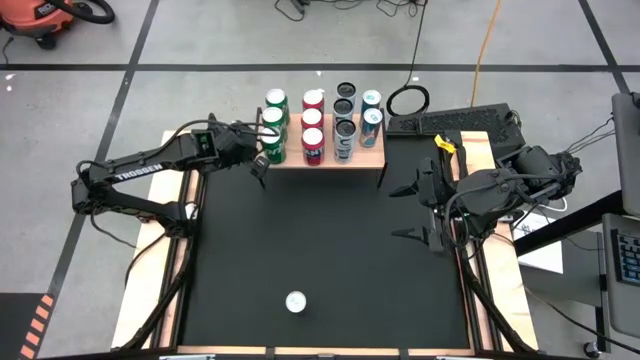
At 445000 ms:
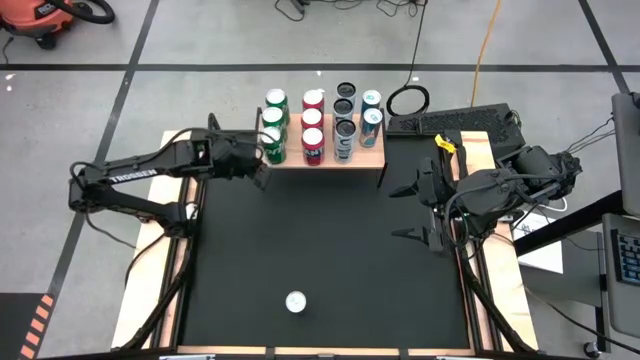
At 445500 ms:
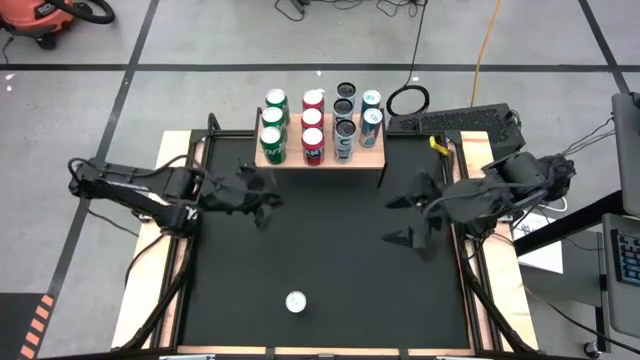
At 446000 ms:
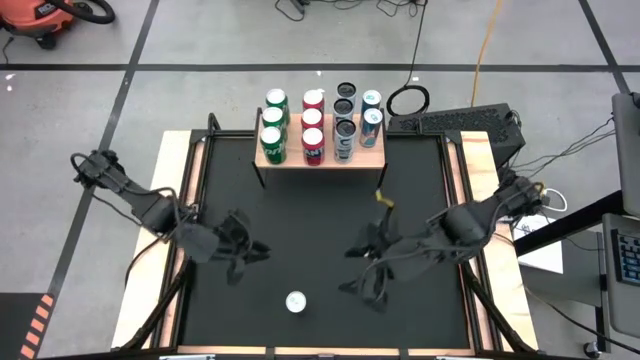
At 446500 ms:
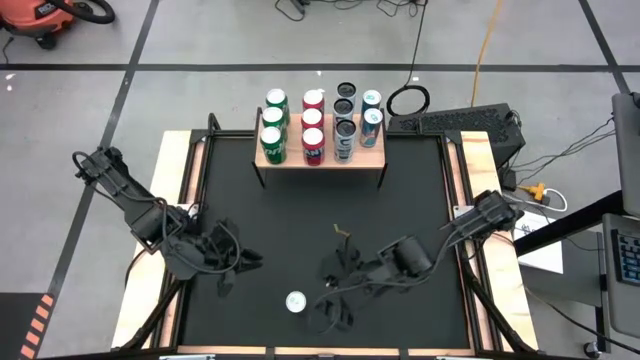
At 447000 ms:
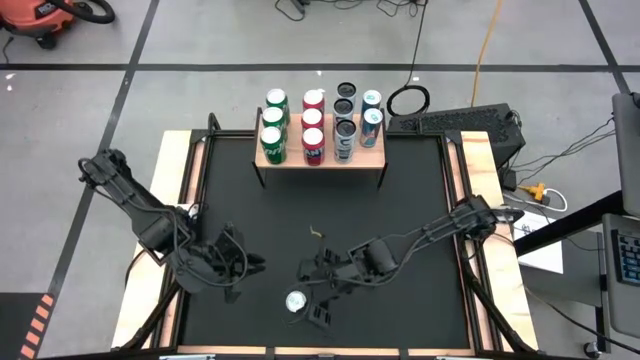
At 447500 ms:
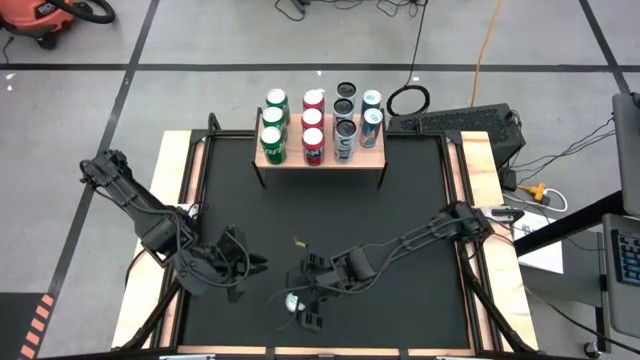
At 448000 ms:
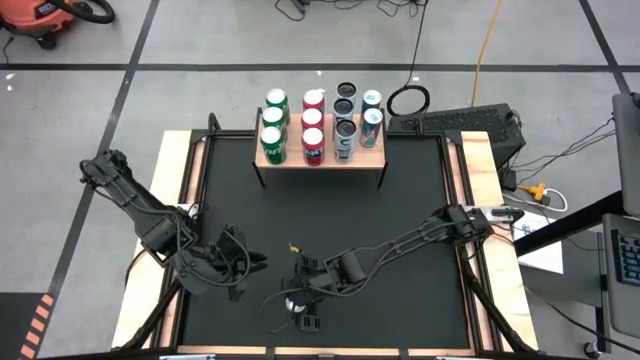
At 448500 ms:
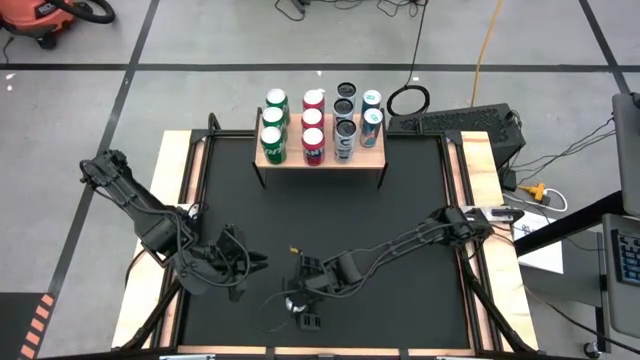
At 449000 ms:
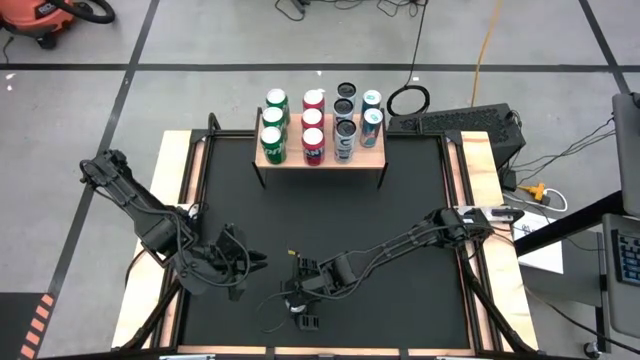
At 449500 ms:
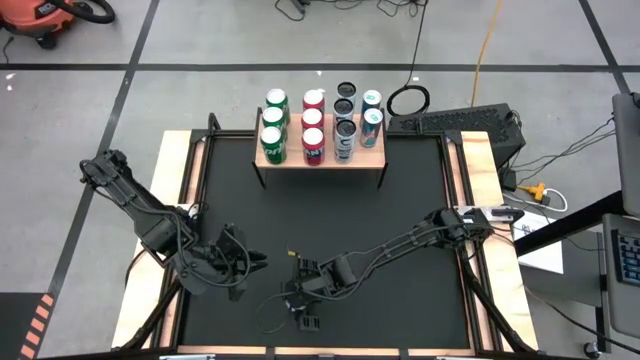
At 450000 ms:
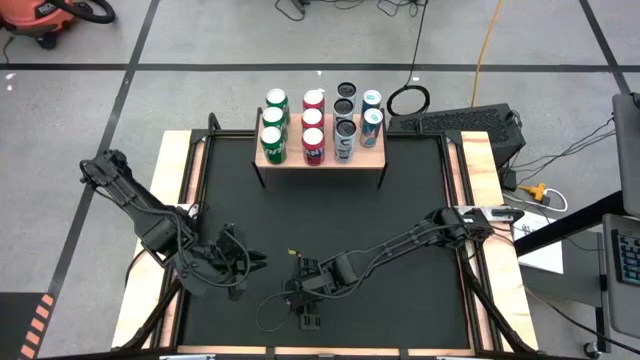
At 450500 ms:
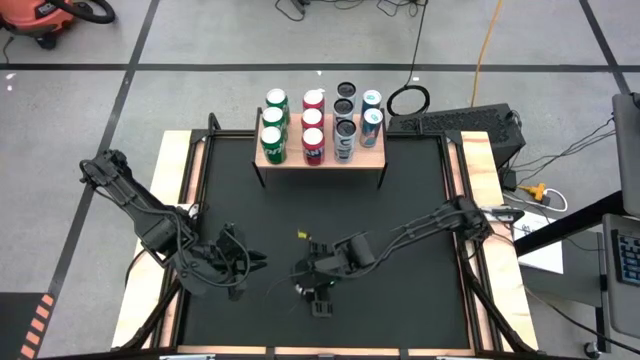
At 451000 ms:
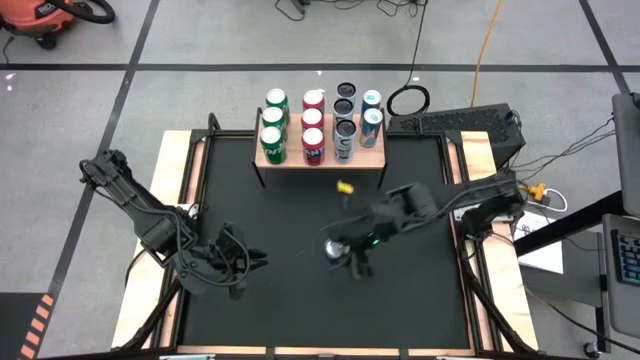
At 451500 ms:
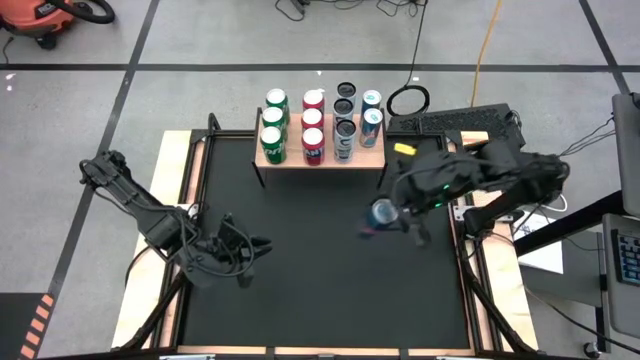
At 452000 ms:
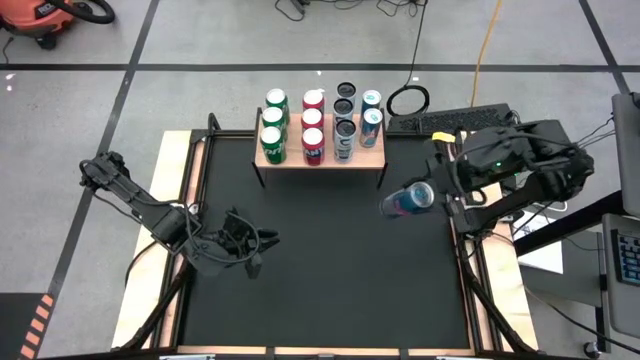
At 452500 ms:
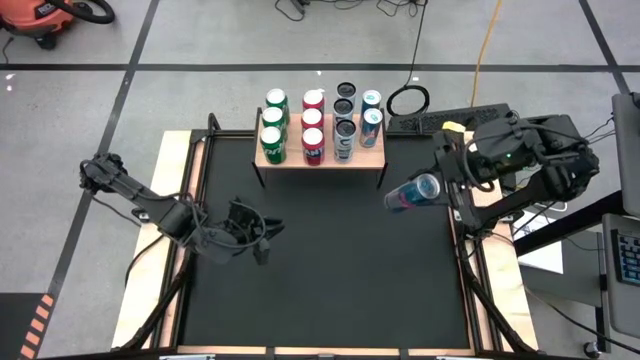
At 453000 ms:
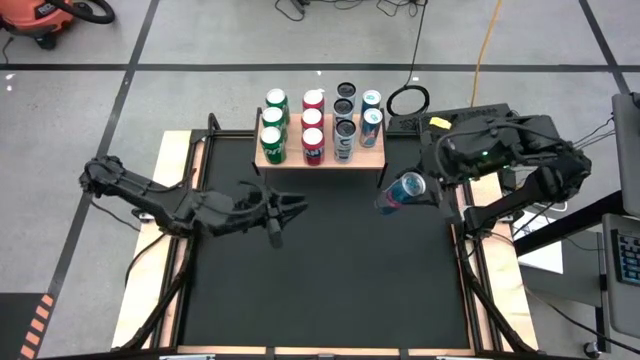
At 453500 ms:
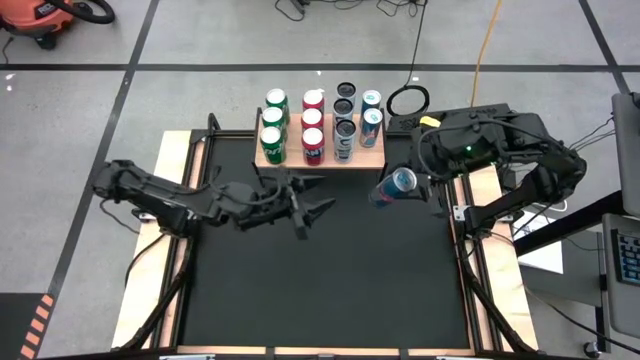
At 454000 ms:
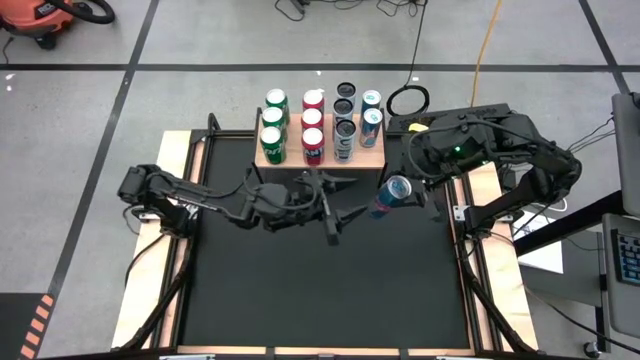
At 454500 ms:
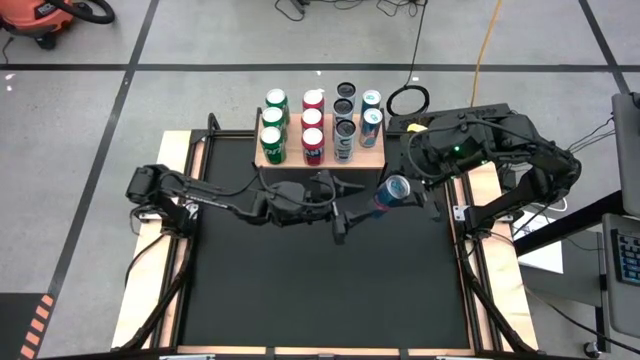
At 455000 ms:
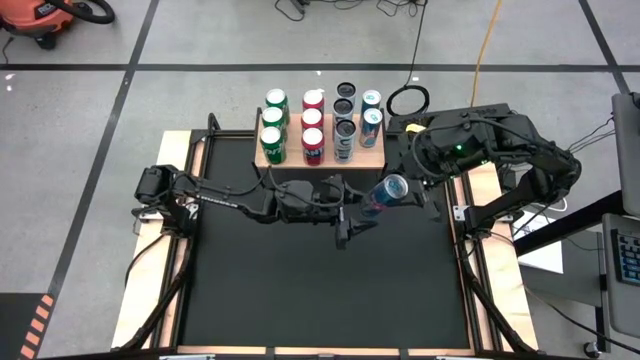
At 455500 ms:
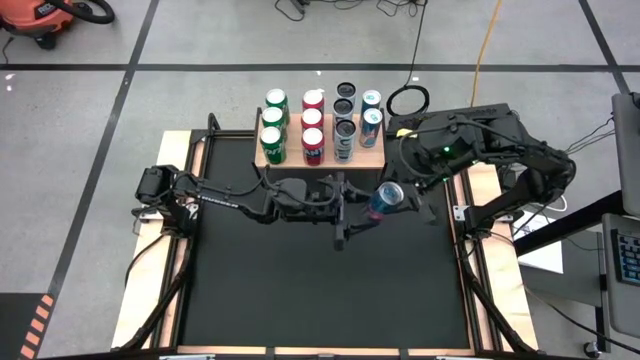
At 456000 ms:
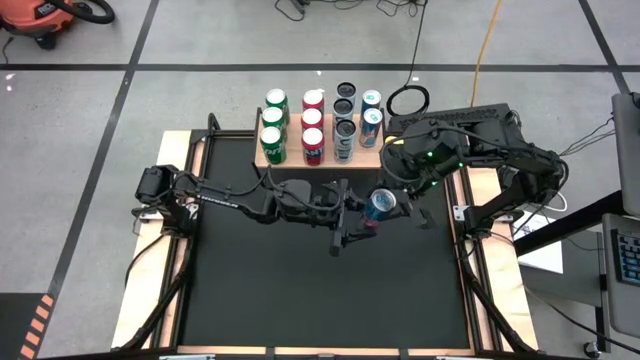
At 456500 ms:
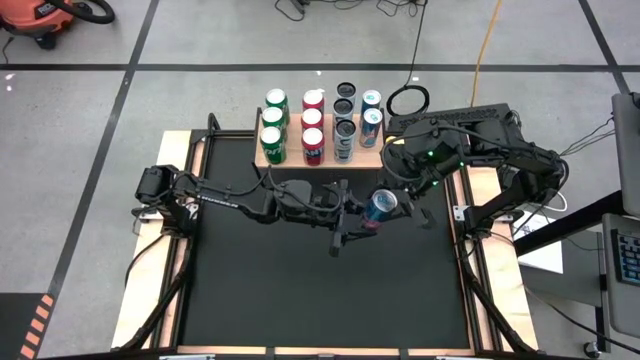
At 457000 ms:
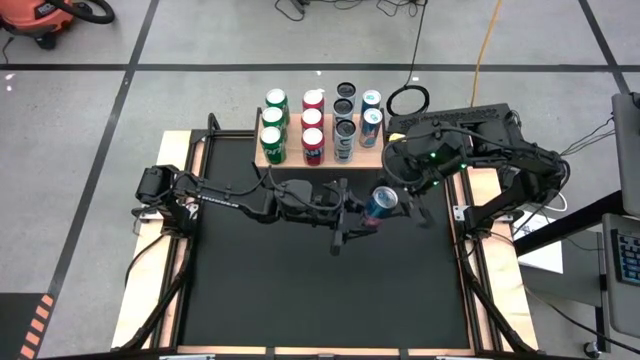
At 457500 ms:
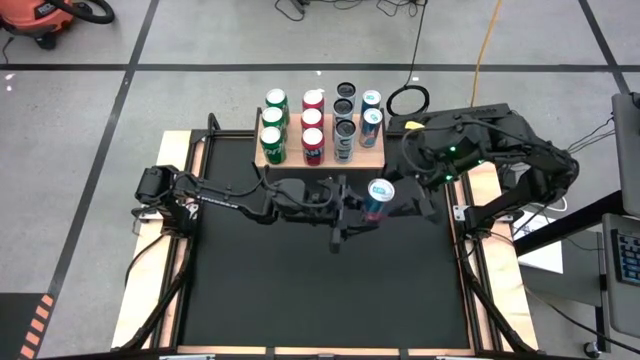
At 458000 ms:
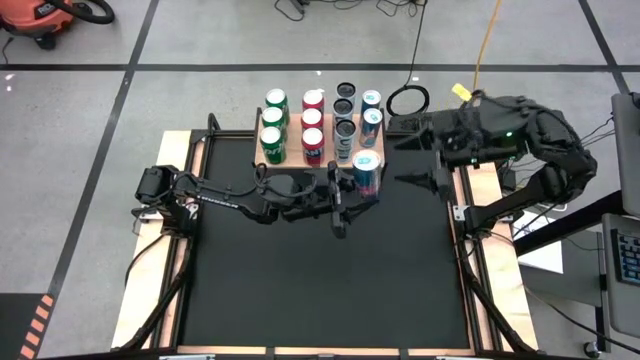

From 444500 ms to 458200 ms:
Task: Place canned beverage on shelf
Put the blue soda can on the shelf aligned with the other blue soda can

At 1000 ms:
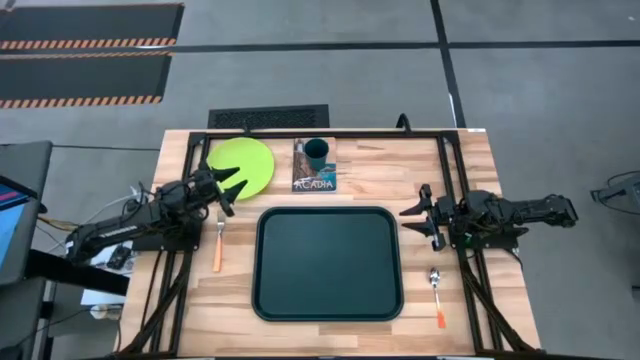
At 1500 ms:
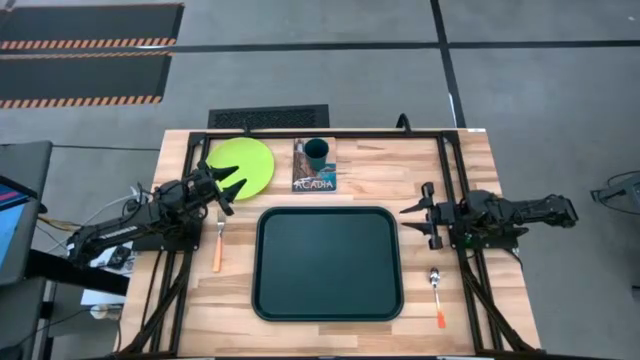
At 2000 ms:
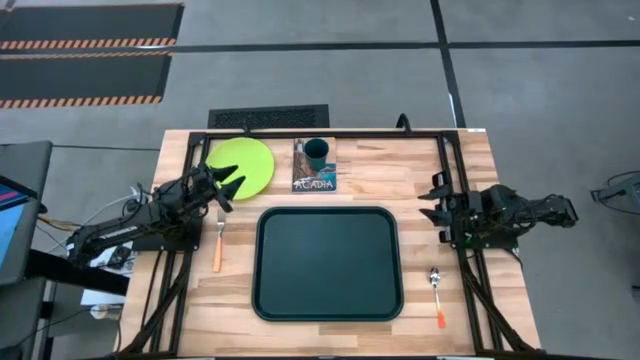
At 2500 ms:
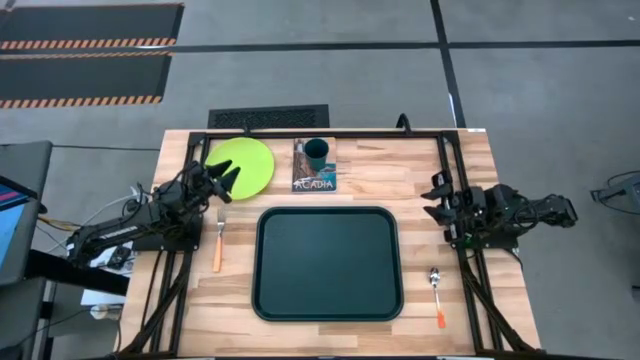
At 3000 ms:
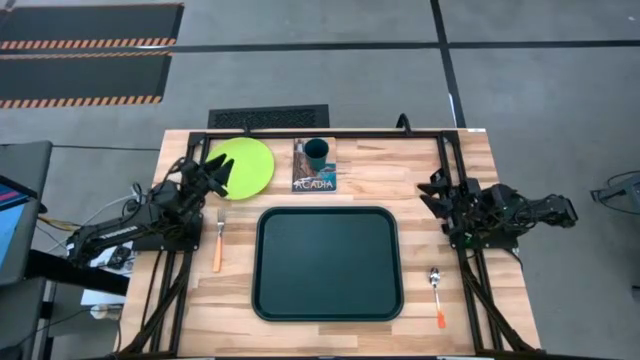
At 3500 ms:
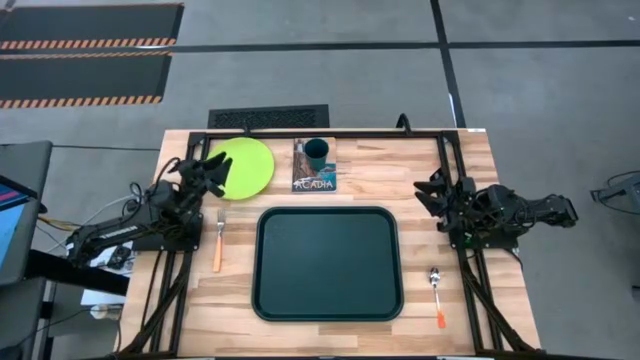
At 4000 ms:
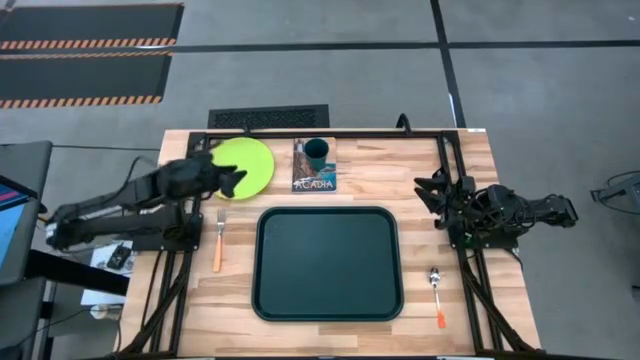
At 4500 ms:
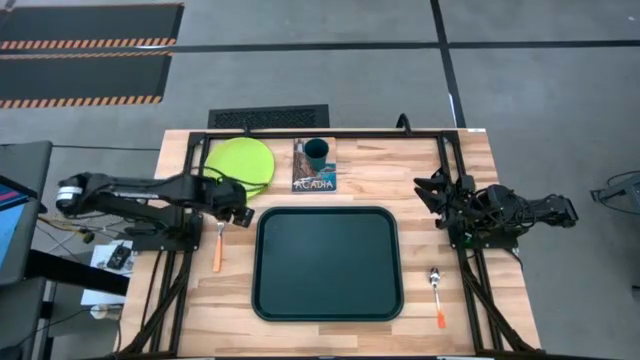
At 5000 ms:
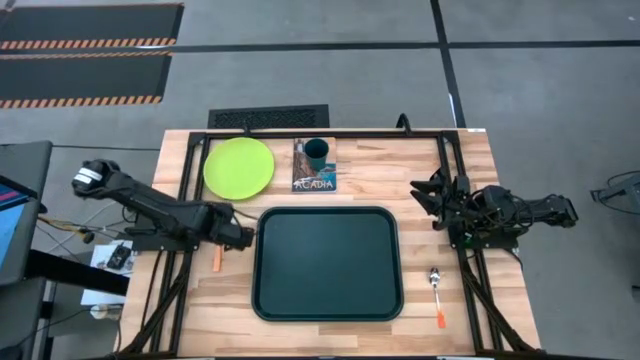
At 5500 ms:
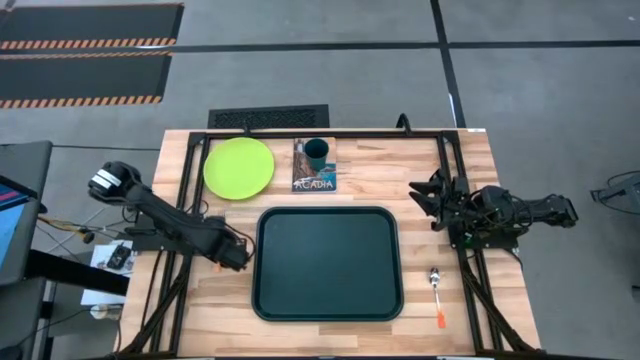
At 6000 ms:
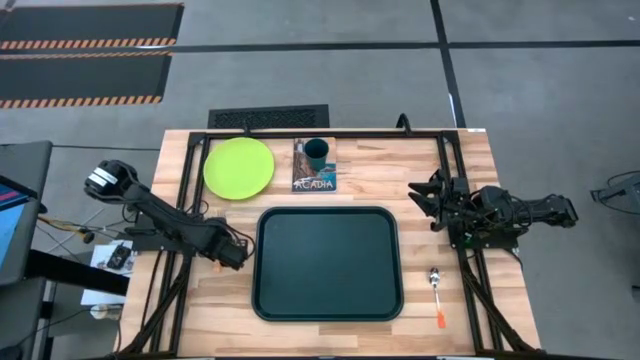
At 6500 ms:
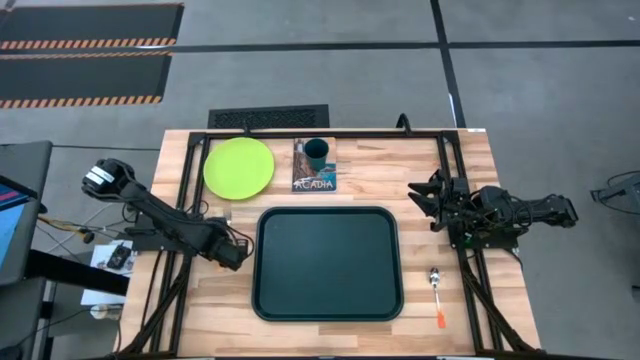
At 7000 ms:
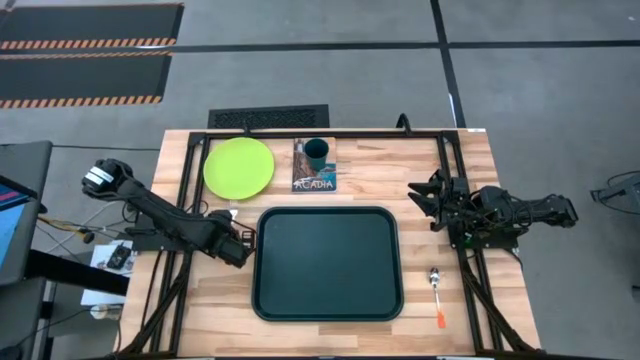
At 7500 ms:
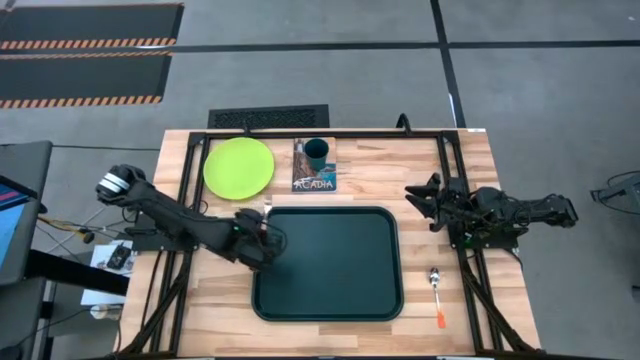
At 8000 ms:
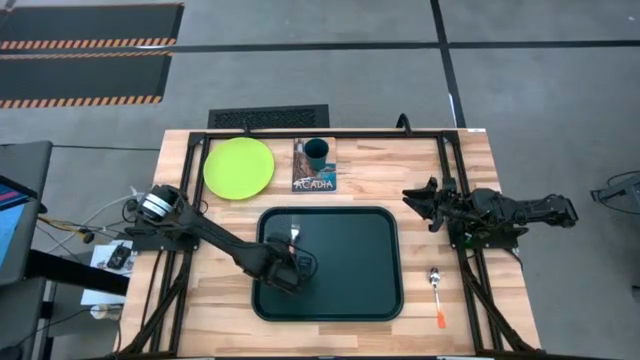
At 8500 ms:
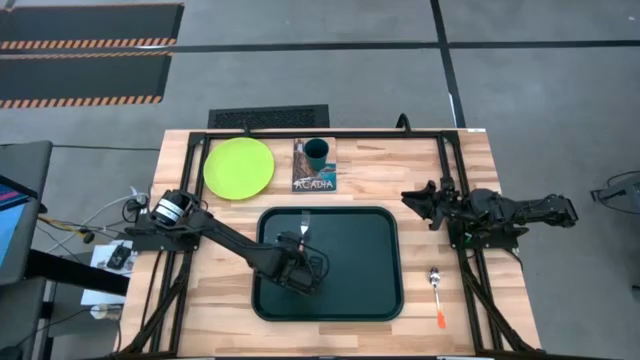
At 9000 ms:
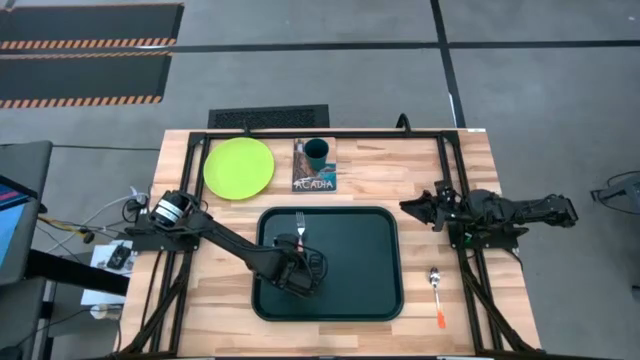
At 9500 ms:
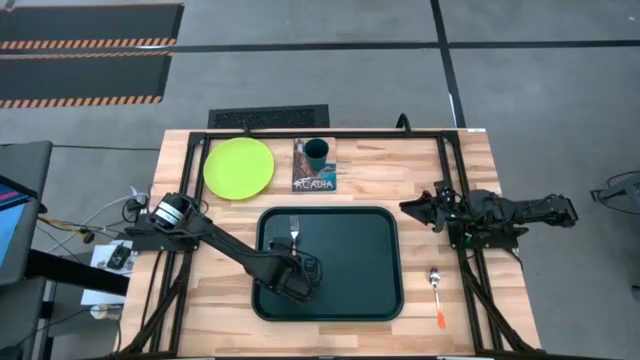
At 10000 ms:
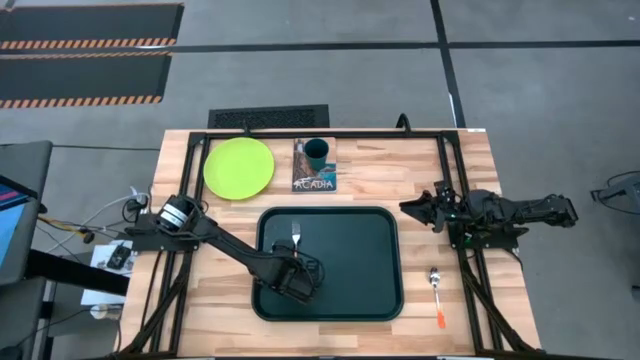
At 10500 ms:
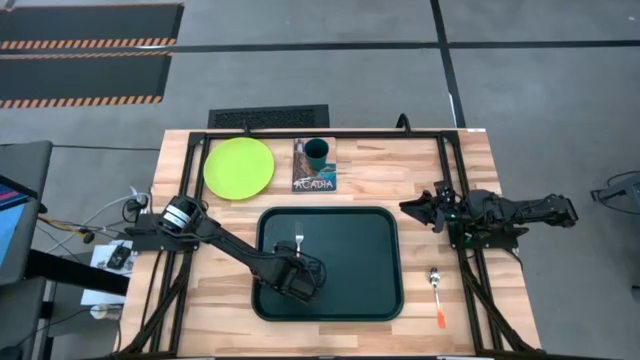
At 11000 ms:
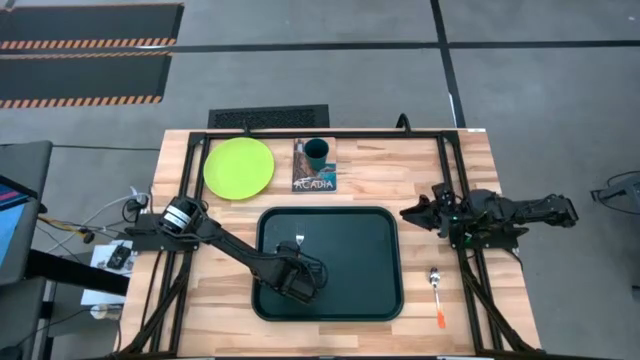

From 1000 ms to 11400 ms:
Task: Pick and place plate/cup/fork/spoon on tray
Put the orange fork on the left of the black tray
